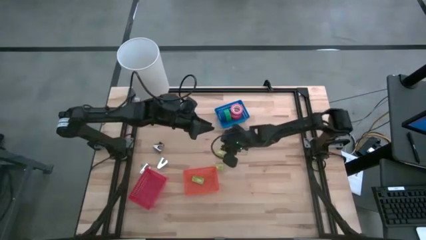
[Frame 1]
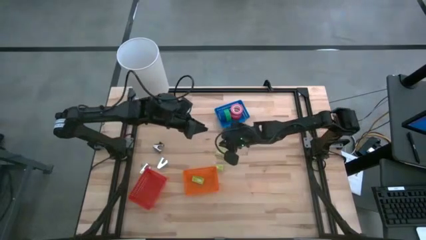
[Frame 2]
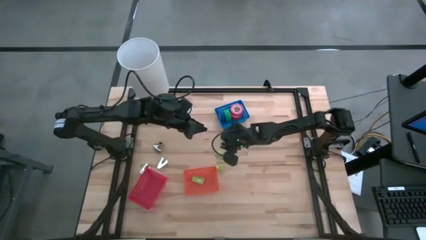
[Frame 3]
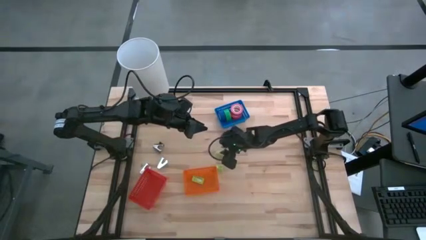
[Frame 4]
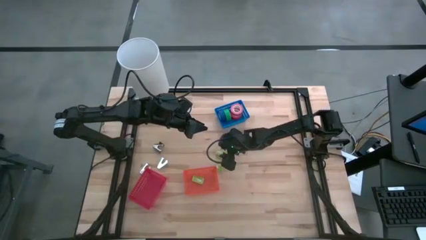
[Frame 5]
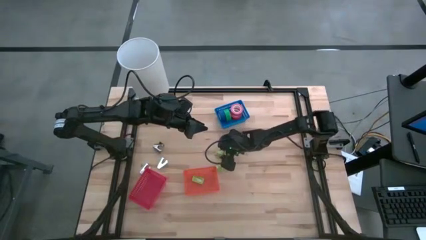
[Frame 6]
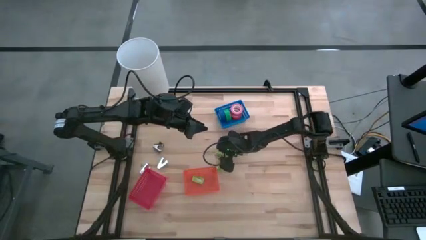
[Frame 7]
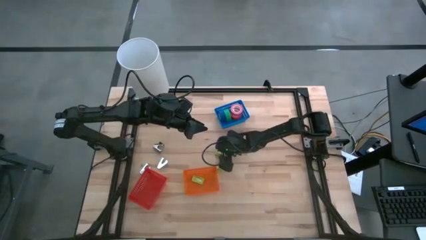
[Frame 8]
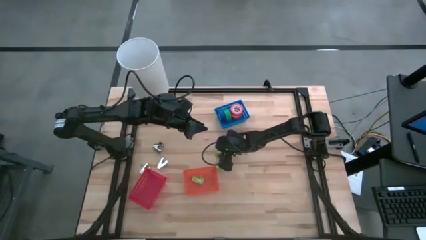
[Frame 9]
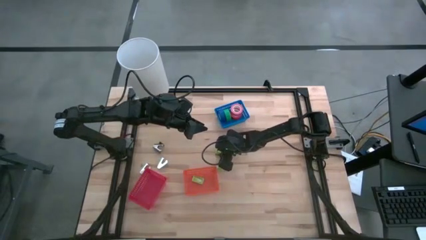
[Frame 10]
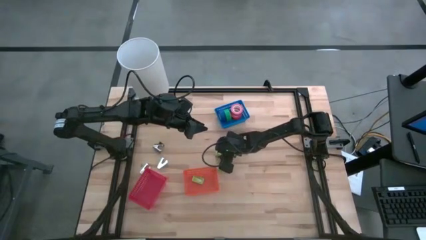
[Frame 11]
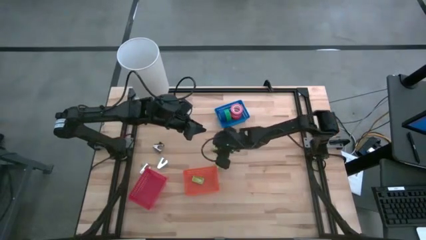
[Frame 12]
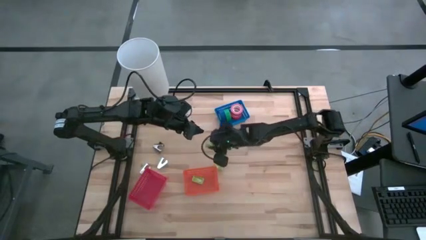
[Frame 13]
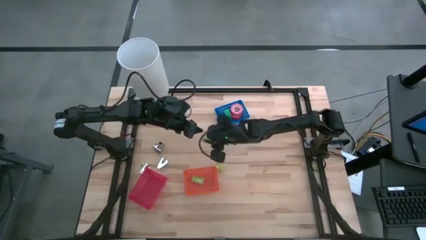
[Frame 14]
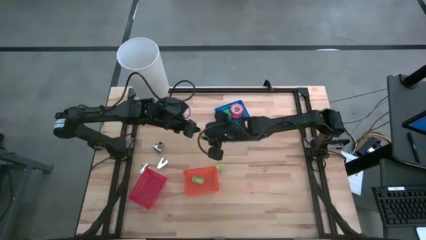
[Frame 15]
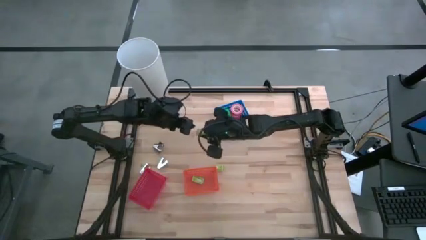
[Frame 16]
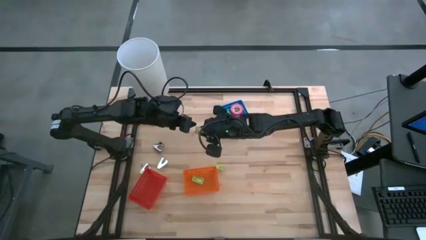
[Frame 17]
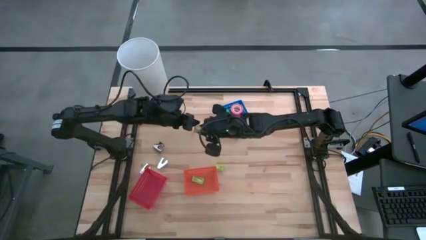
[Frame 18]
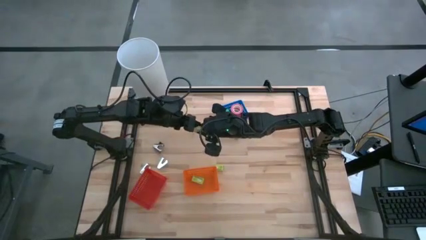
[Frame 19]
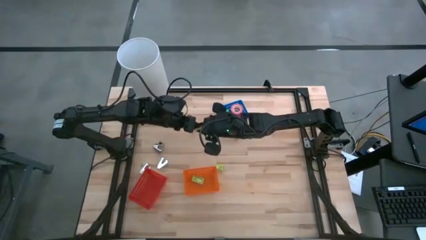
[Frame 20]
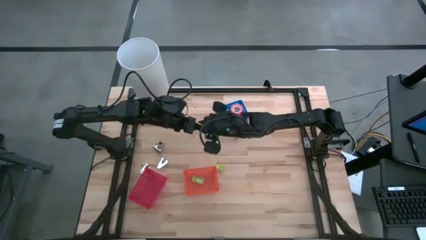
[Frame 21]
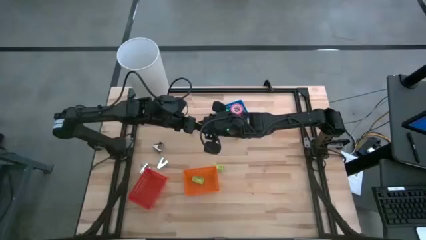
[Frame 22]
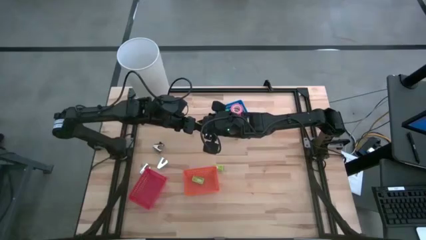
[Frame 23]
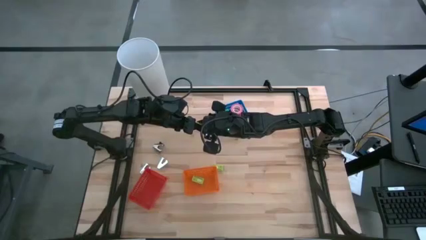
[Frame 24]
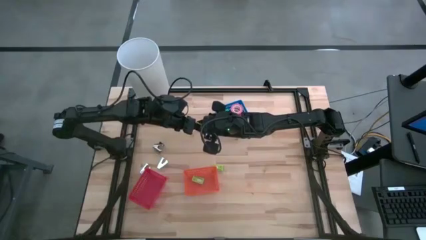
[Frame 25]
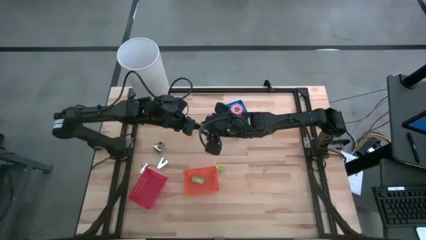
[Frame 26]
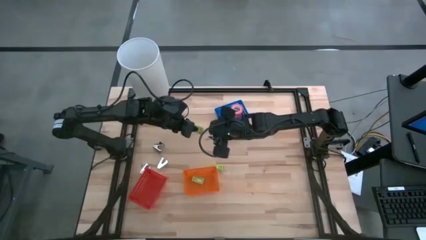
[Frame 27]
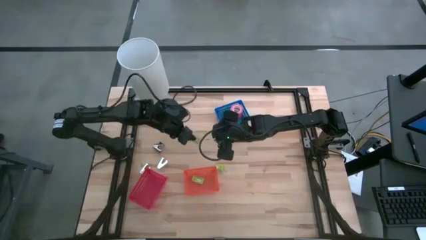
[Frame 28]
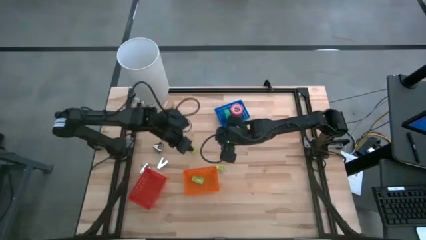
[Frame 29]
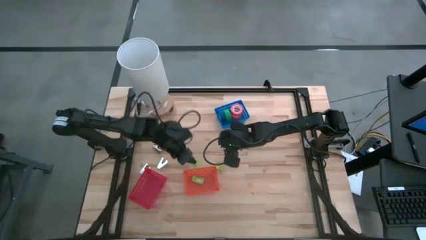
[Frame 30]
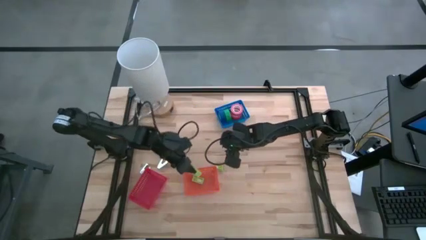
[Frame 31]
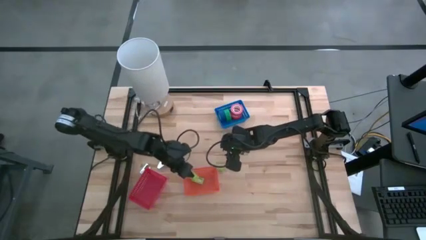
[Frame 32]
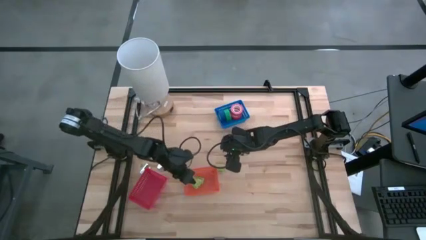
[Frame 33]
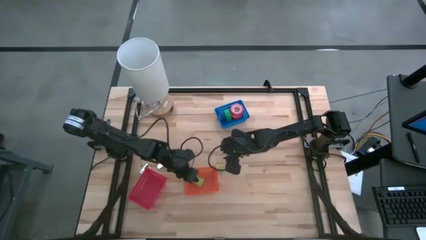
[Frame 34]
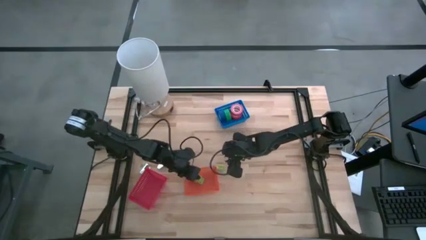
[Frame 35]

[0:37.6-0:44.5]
Task: Pick and place Stapler, Stapler remover, tape
Put the top green box of staples into the orange bin

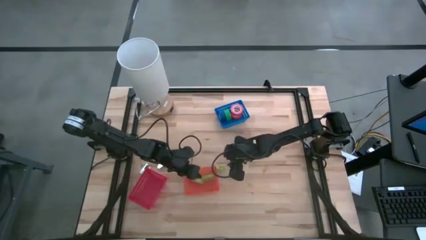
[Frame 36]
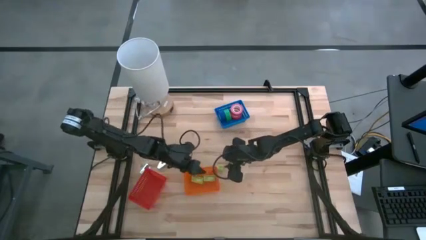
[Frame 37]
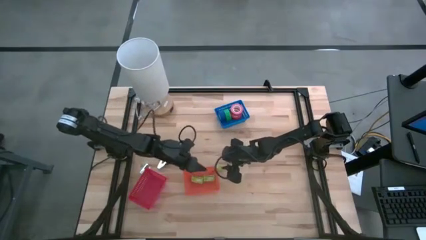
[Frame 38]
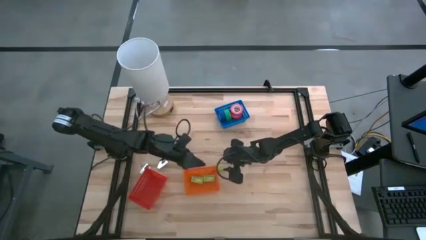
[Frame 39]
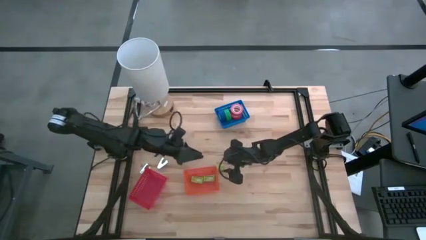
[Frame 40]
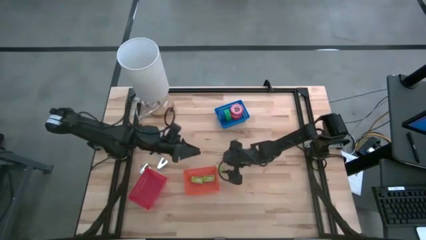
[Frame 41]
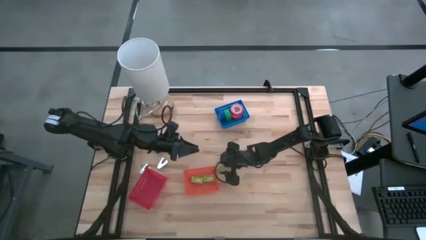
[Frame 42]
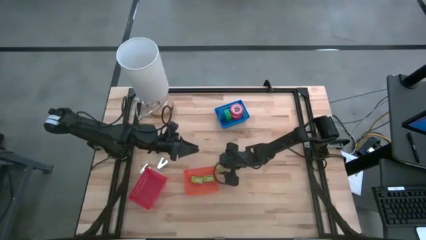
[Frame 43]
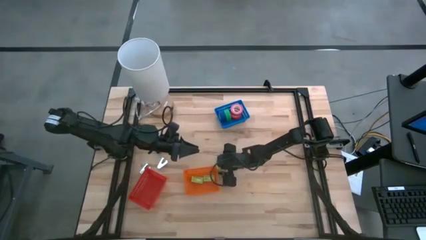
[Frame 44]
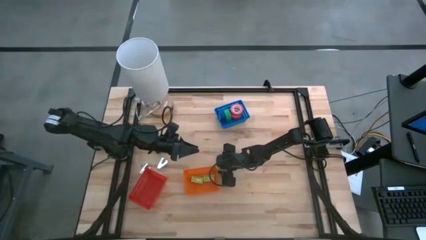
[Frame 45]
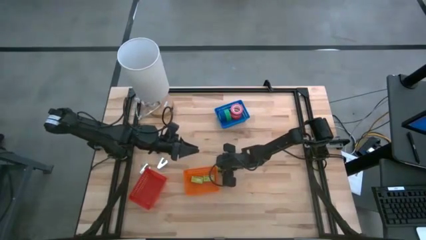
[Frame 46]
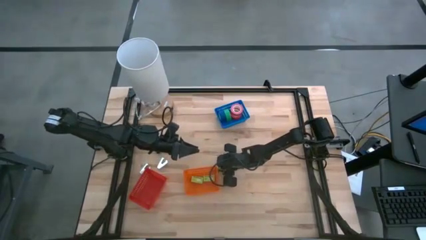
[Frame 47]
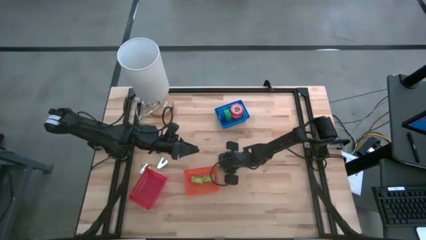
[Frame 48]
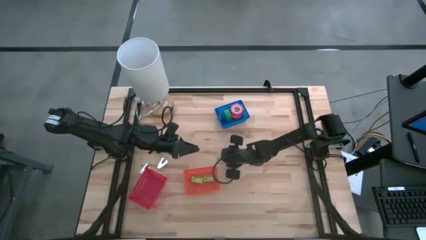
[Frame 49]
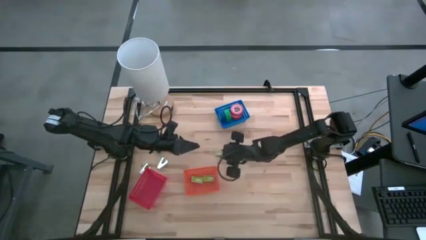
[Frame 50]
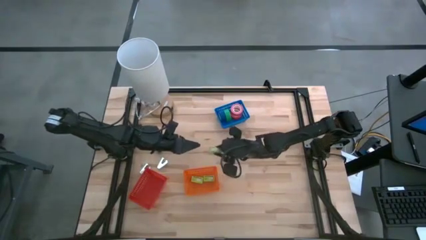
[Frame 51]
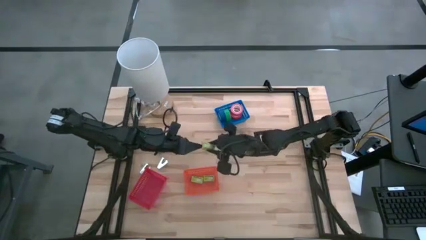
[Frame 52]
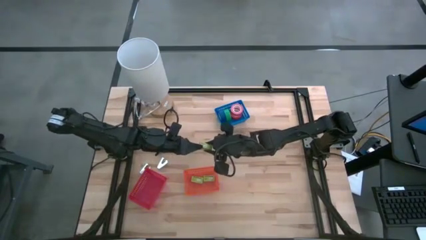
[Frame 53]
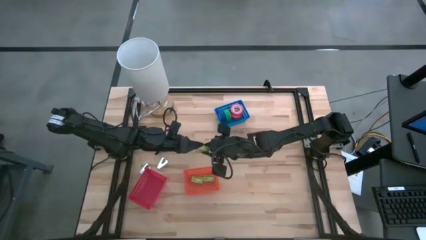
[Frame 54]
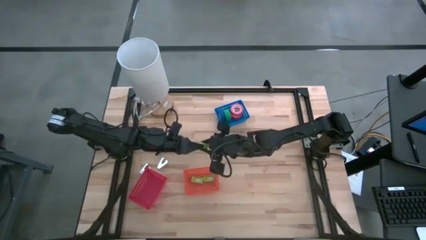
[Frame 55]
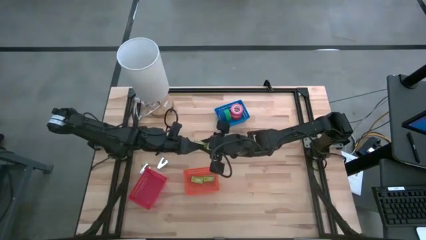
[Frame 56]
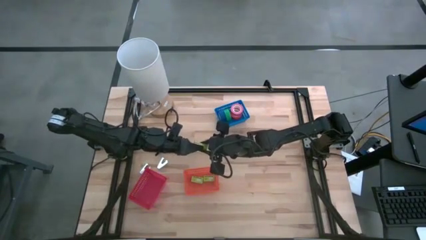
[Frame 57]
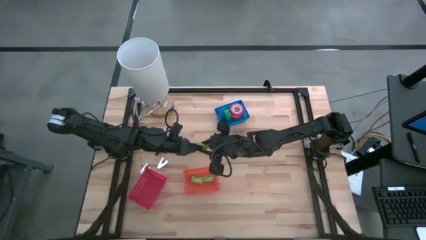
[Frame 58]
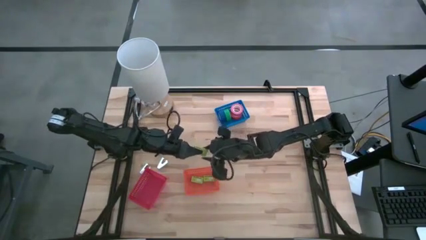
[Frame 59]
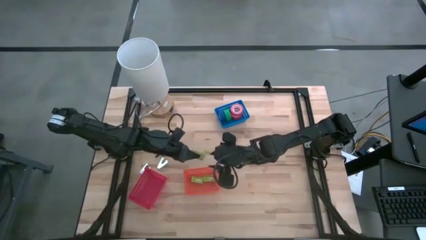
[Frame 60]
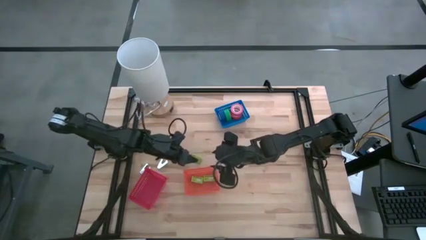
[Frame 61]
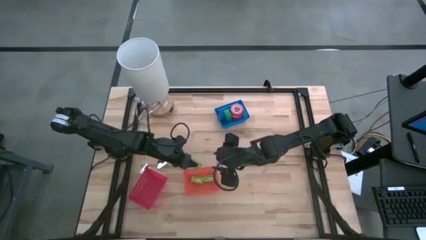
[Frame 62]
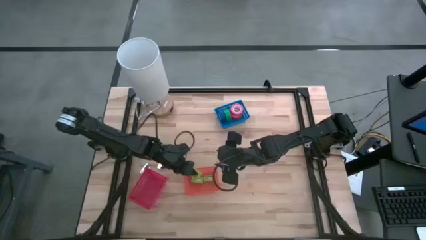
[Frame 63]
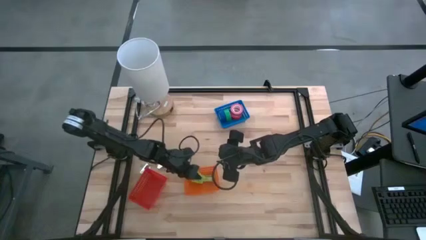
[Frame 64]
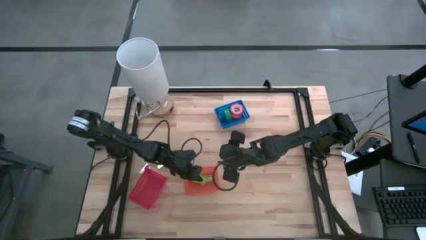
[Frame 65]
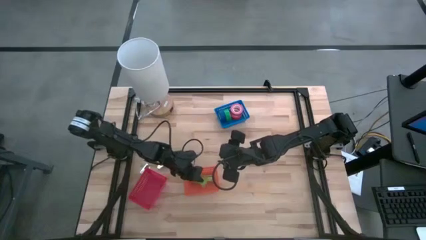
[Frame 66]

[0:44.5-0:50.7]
Put the green box of staples into the orange bin

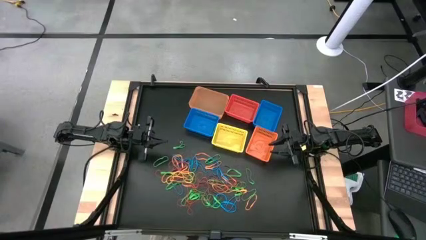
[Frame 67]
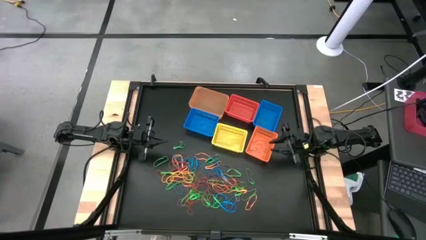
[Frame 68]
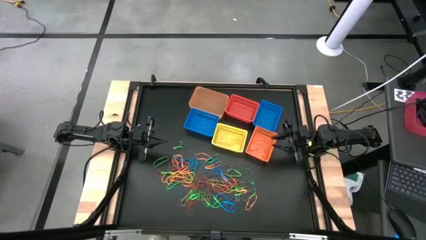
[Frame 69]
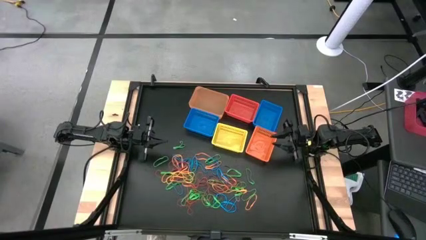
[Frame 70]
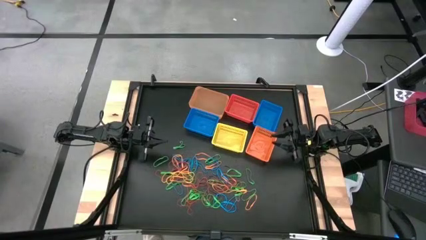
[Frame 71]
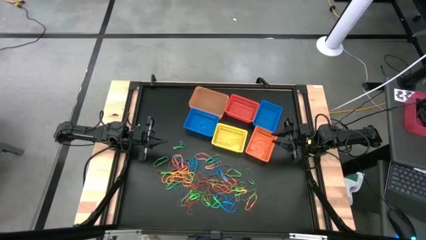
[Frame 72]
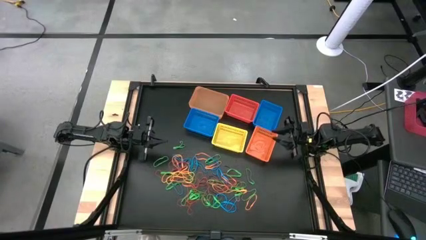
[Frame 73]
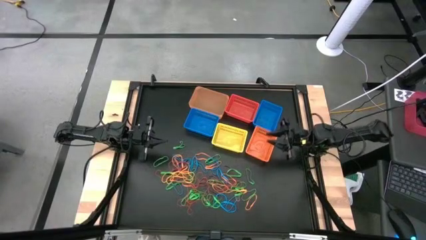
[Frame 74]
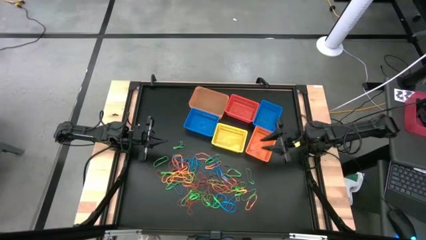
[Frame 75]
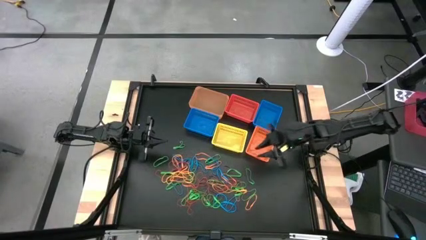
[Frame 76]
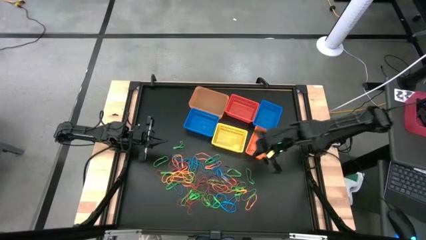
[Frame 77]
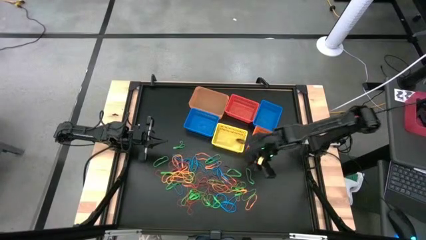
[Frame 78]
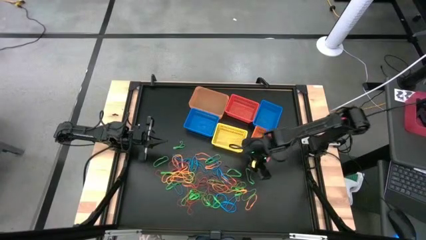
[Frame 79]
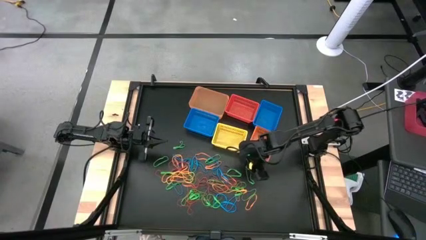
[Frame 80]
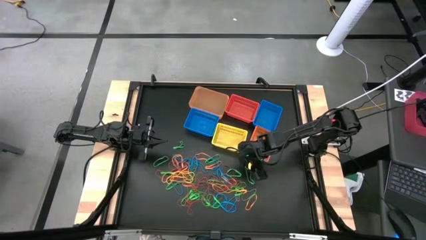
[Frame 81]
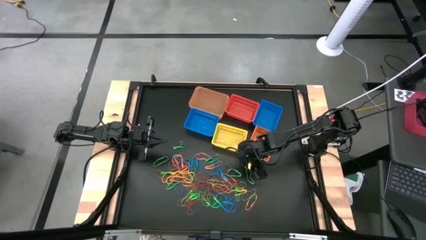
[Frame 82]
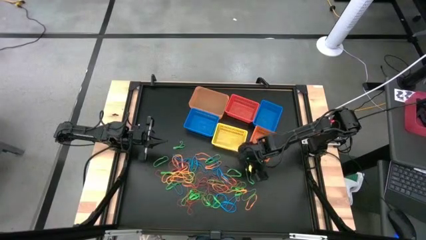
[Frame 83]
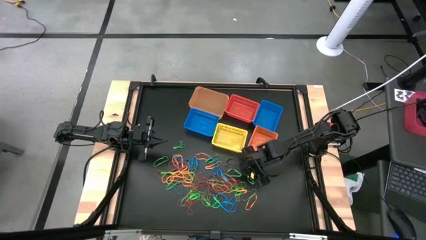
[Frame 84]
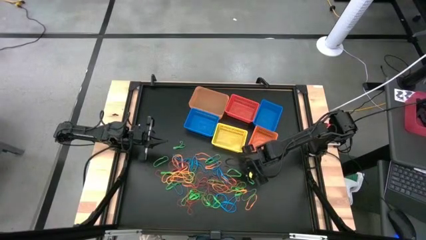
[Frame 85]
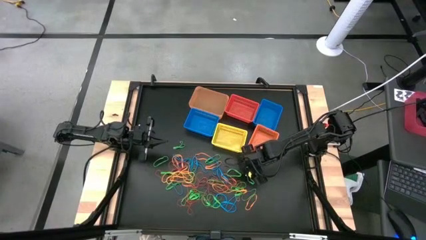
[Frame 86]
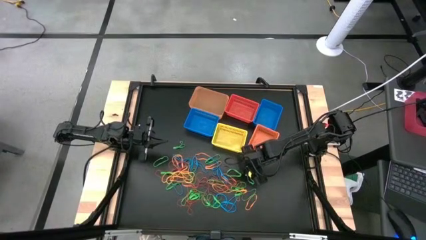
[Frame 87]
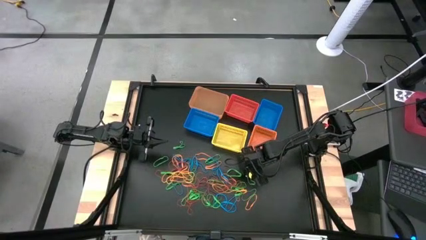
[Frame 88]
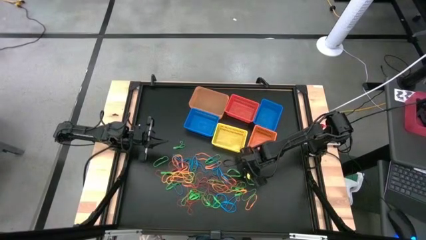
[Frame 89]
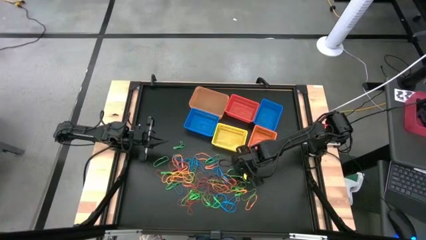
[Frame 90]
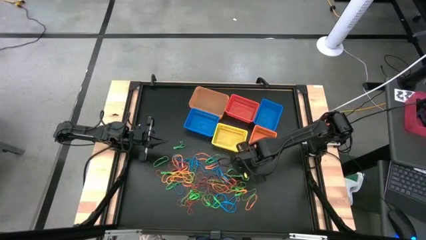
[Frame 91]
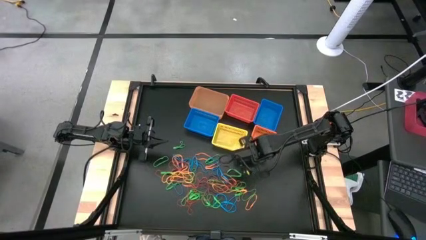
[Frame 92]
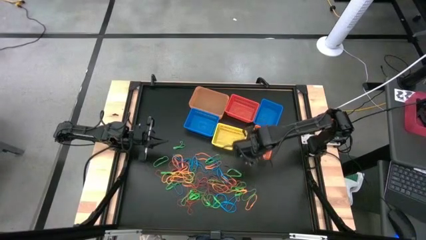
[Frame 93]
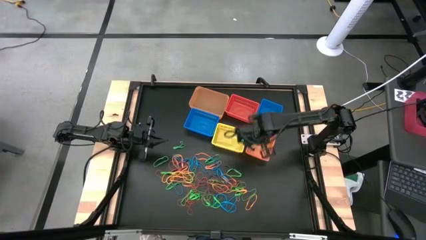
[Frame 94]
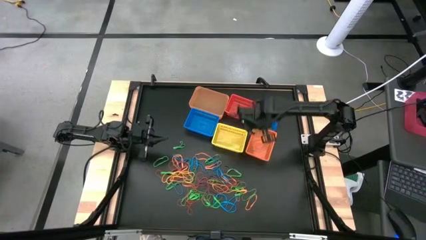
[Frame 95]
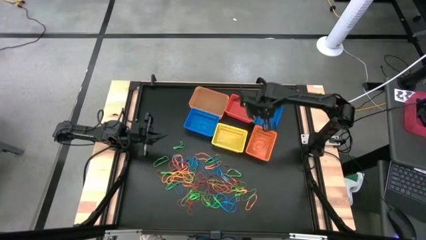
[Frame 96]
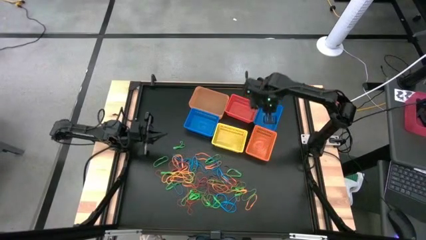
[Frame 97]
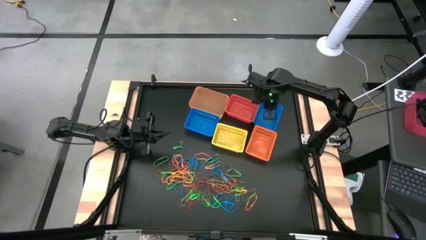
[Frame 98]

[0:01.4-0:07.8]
Task: Sort rubber bands into baskets
Put the green rubber band into the right blue basket
